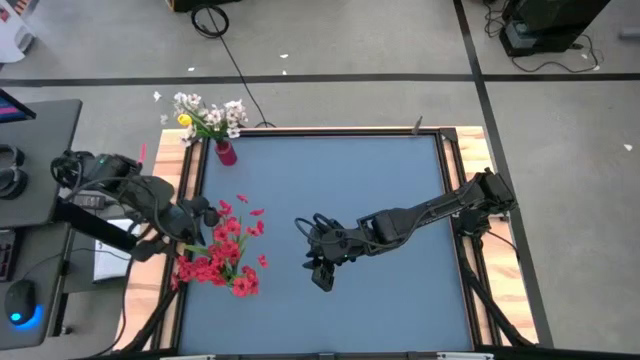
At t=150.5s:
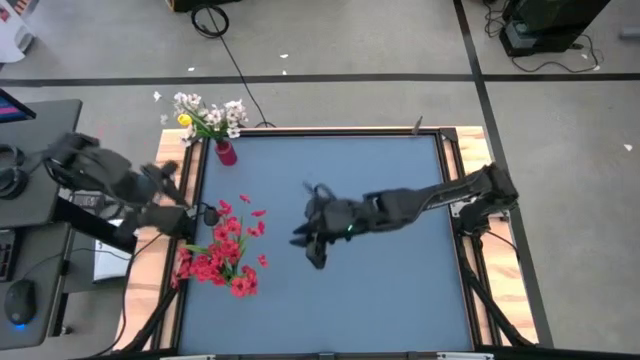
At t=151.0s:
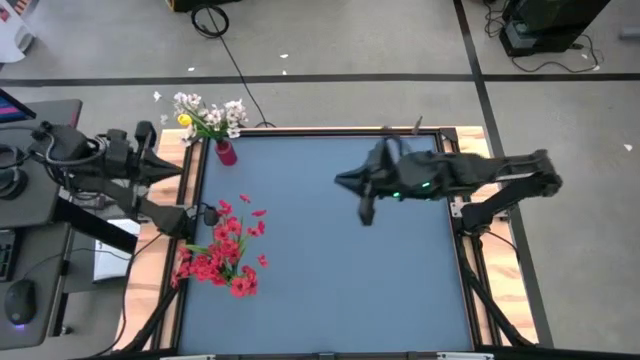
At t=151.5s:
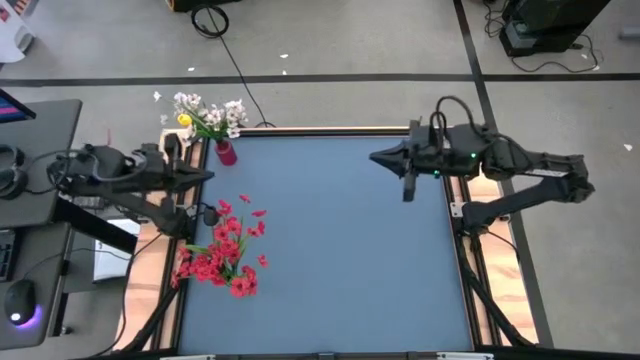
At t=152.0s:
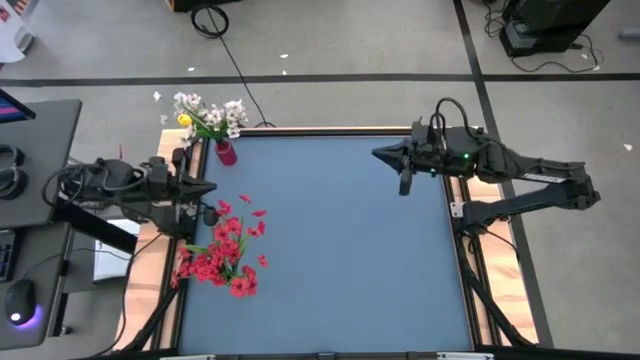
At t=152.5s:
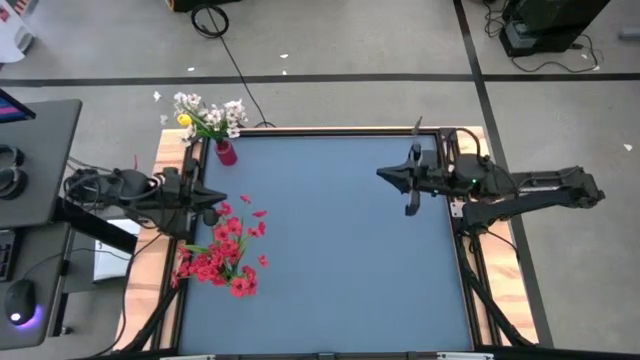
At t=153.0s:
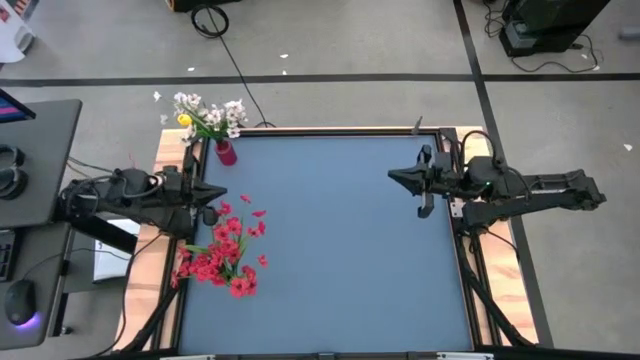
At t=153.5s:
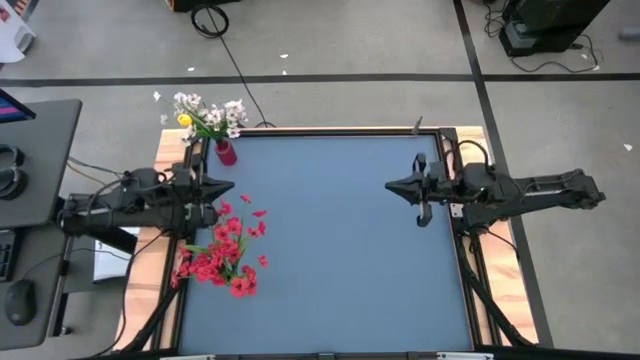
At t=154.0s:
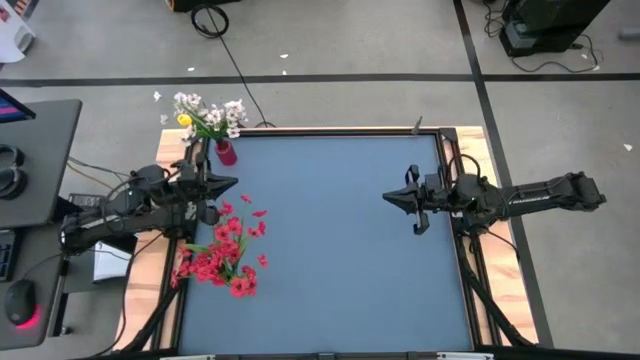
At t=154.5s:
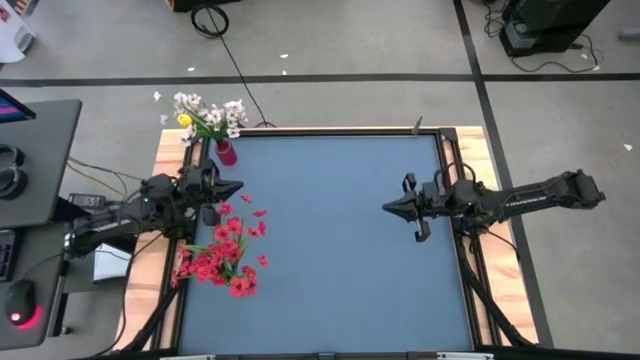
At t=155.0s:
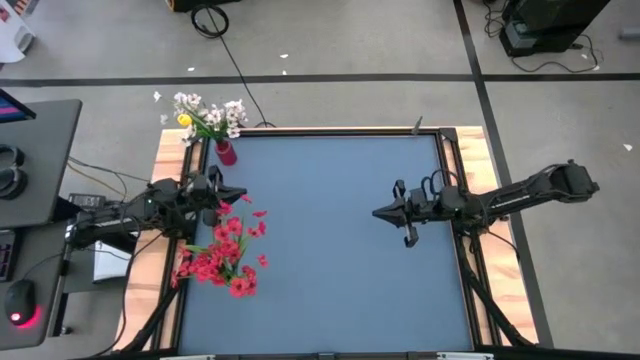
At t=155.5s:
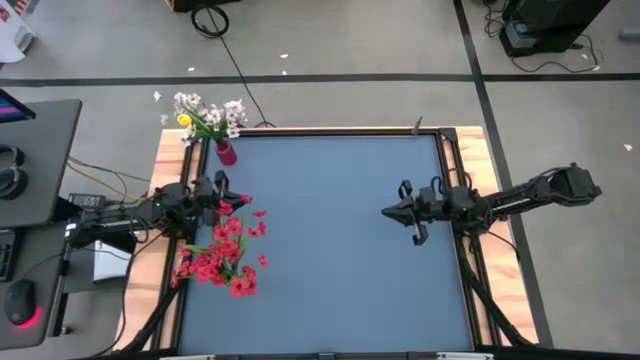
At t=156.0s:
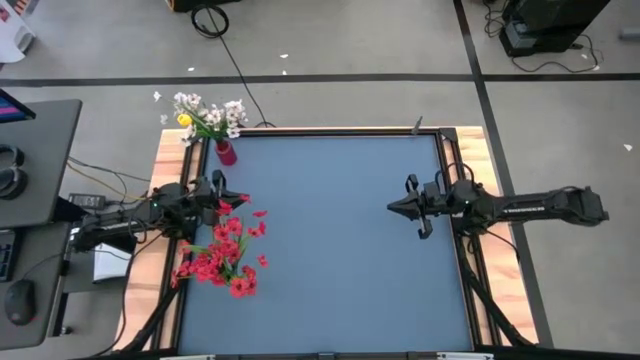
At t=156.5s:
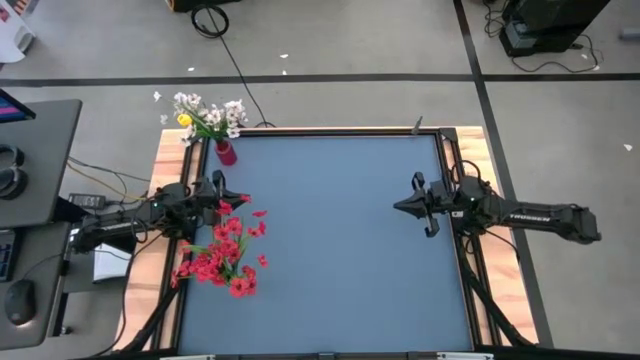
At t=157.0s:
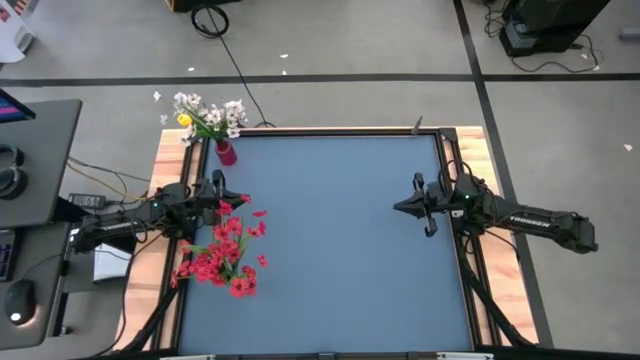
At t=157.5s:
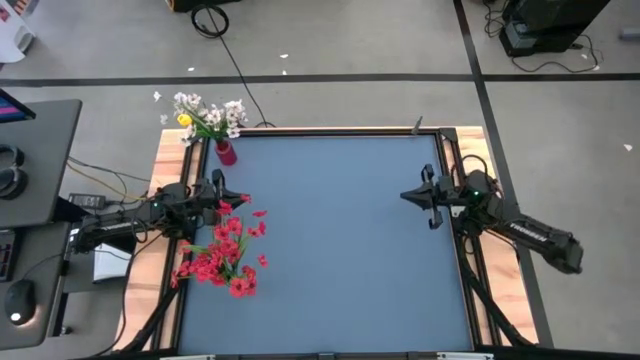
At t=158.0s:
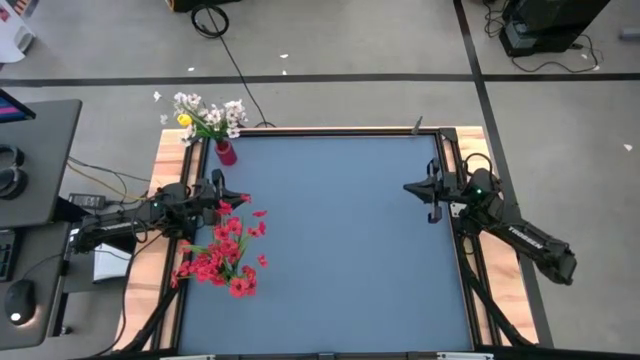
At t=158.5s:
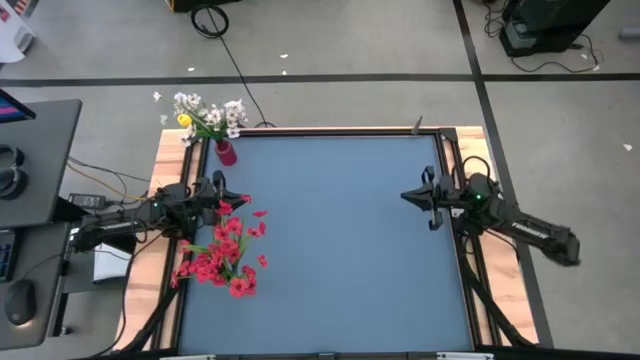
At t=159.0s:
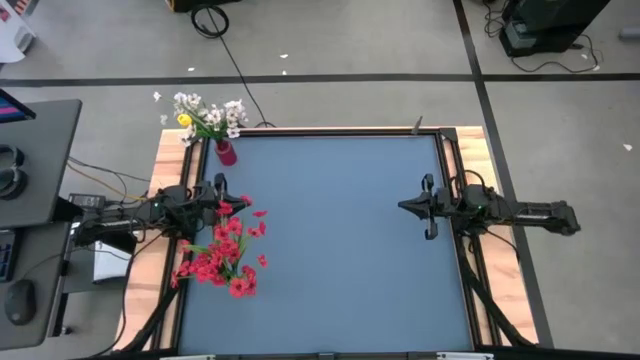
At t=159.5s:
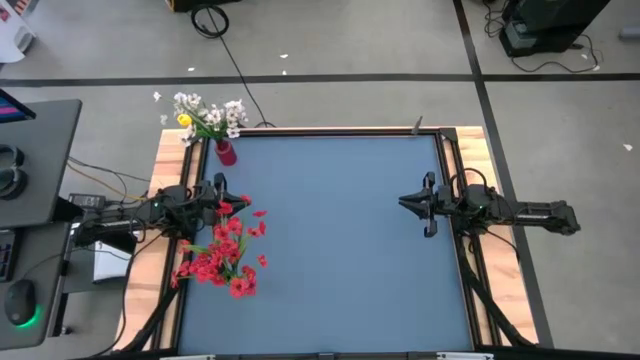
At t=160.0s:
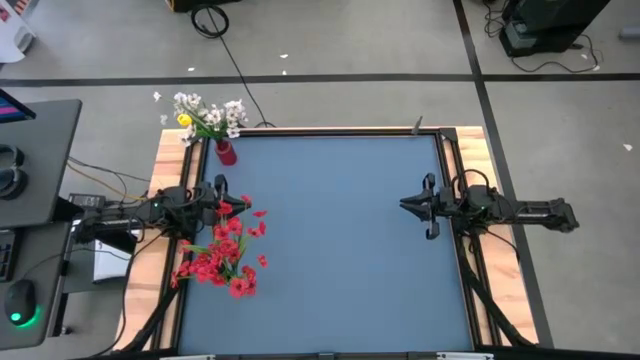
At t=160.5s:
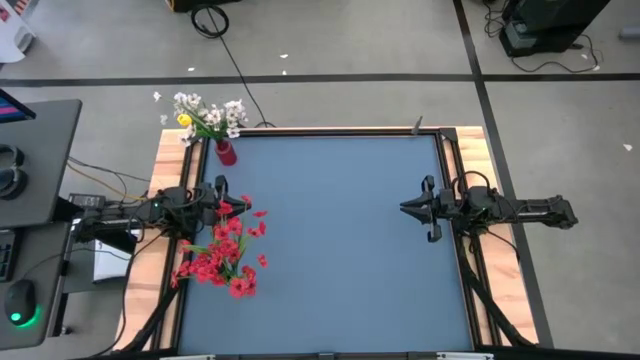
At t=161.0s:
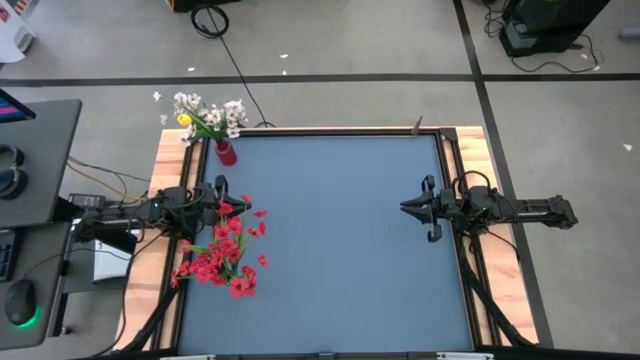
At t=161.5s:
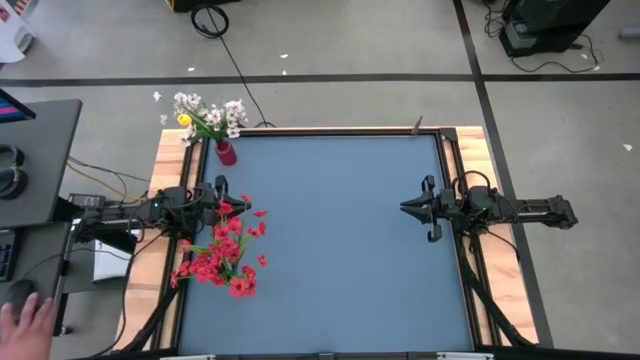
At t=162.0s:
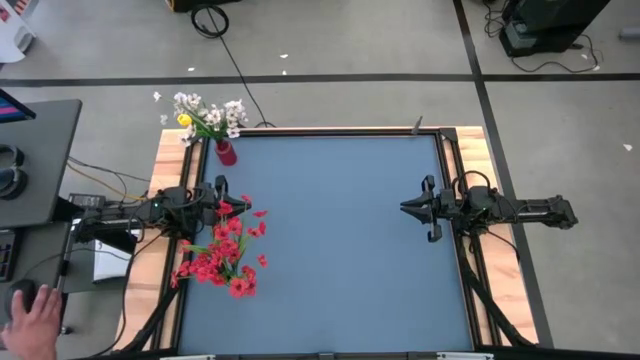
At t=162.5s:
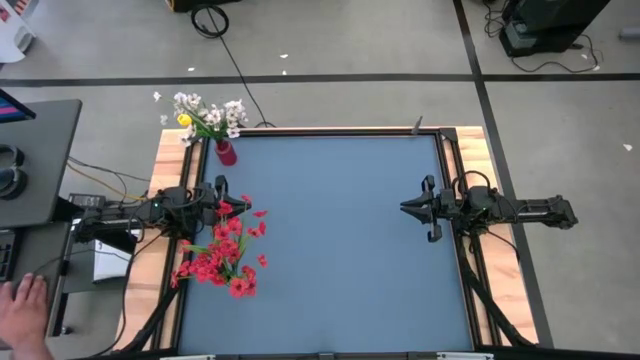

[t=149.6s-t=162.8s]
Task: Sort flowers into vase by color
Return to Home Position

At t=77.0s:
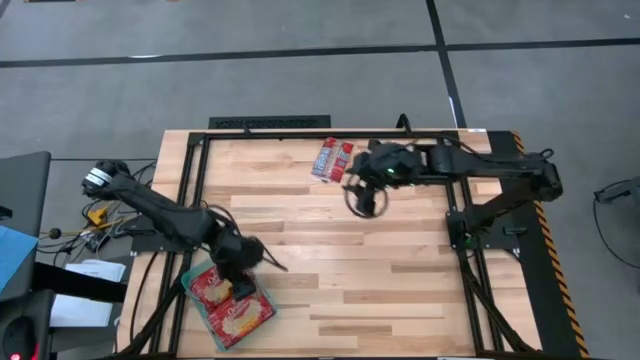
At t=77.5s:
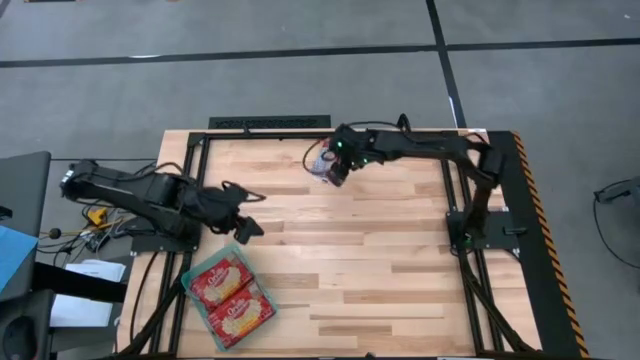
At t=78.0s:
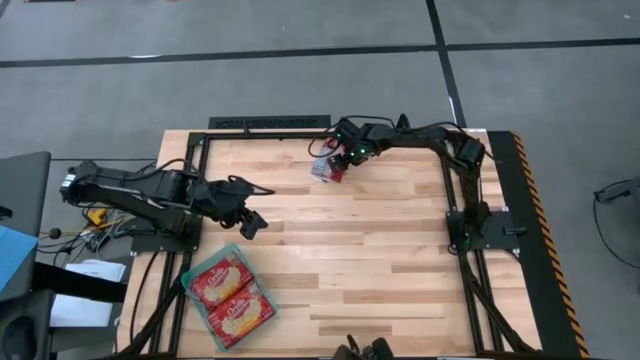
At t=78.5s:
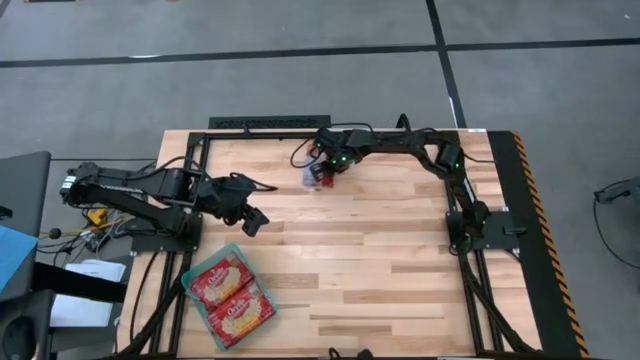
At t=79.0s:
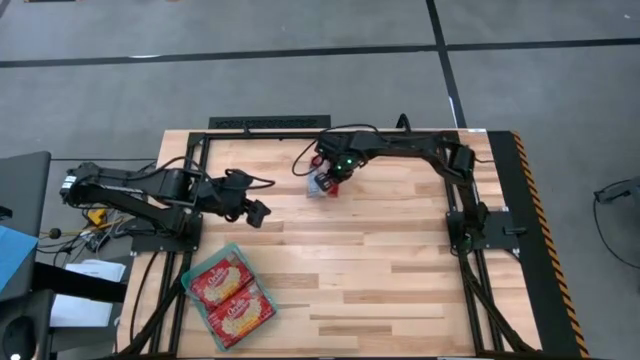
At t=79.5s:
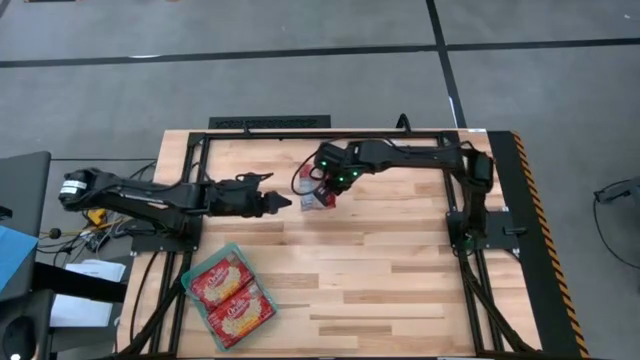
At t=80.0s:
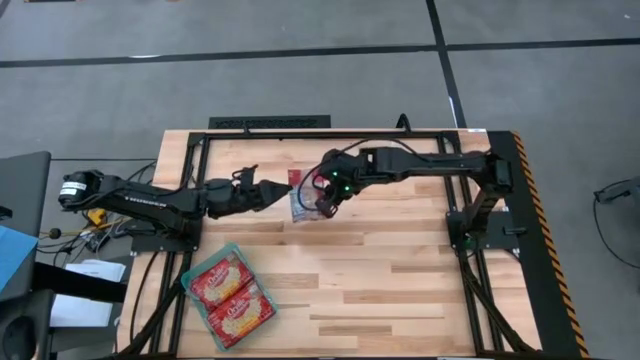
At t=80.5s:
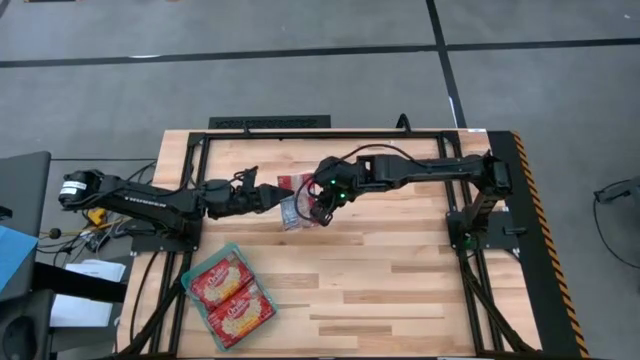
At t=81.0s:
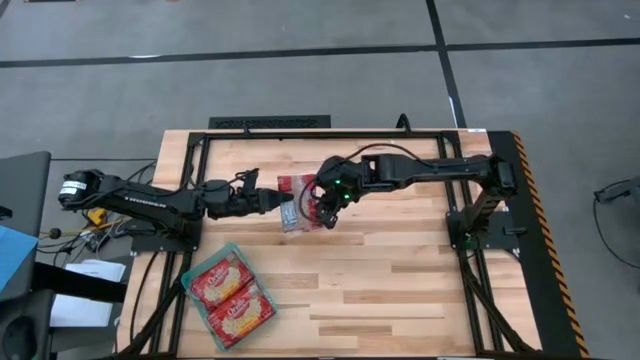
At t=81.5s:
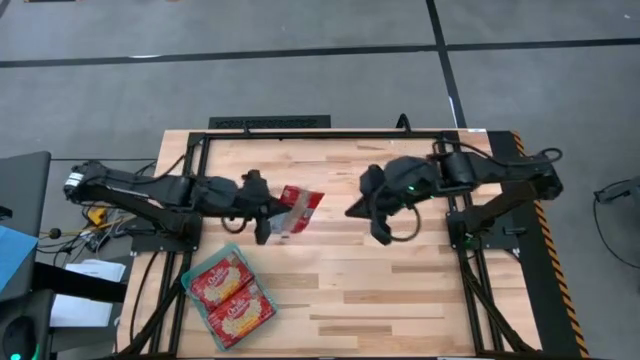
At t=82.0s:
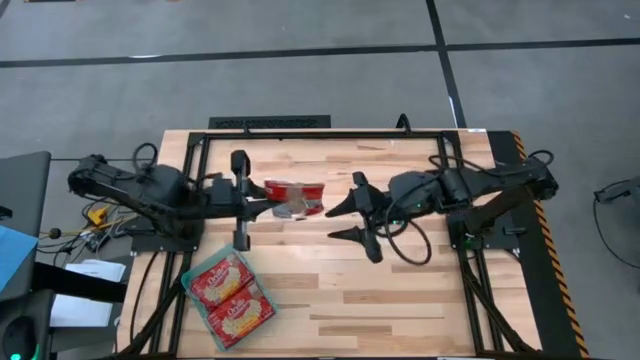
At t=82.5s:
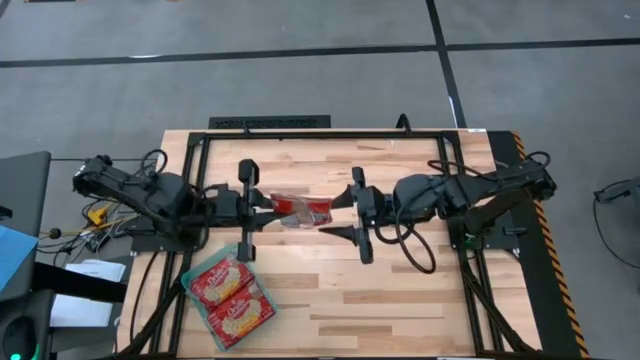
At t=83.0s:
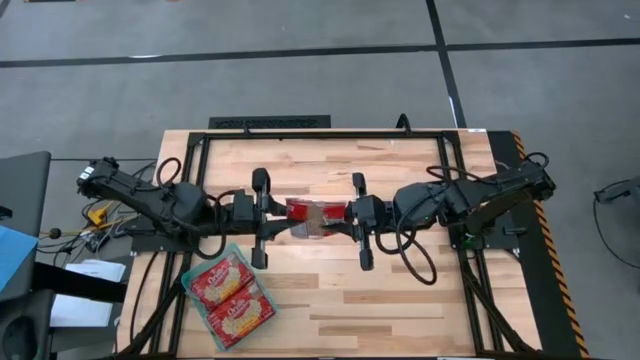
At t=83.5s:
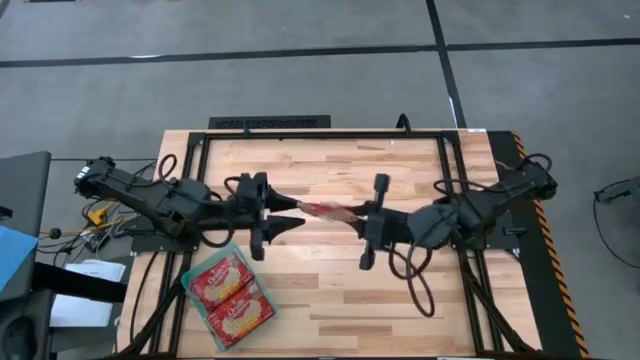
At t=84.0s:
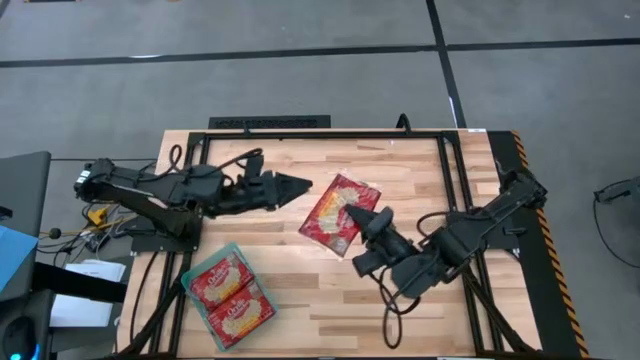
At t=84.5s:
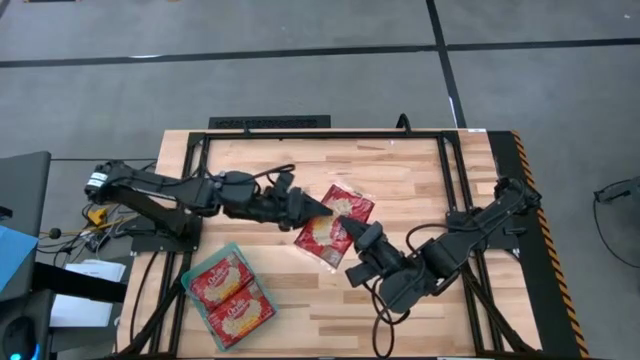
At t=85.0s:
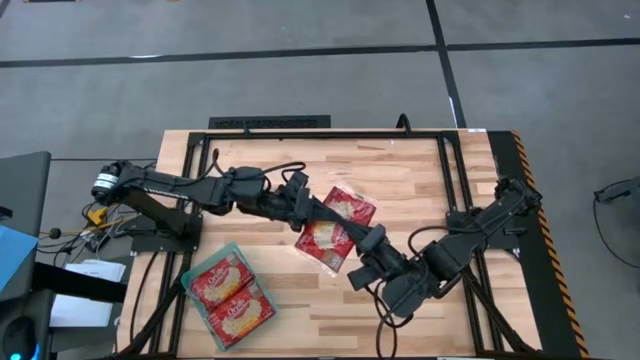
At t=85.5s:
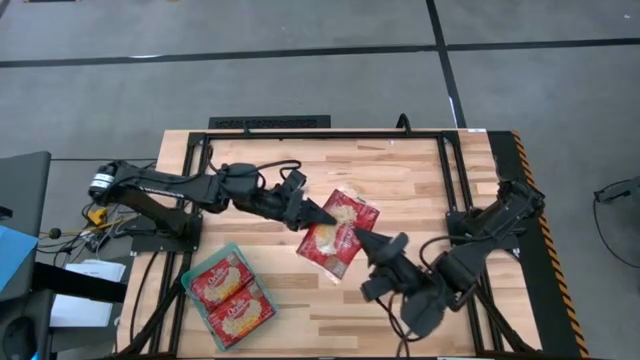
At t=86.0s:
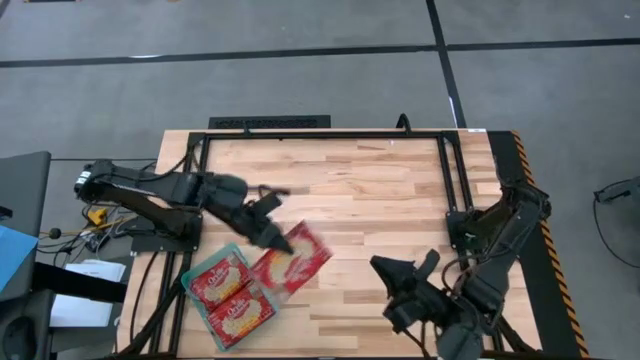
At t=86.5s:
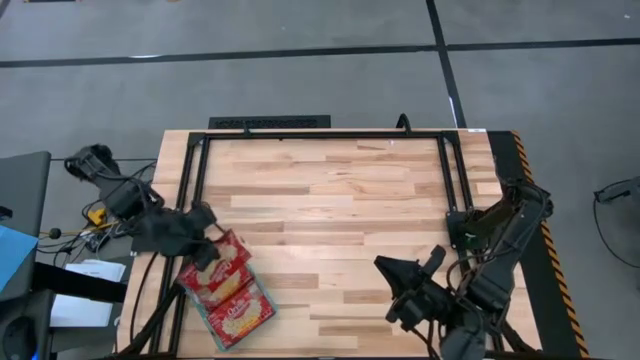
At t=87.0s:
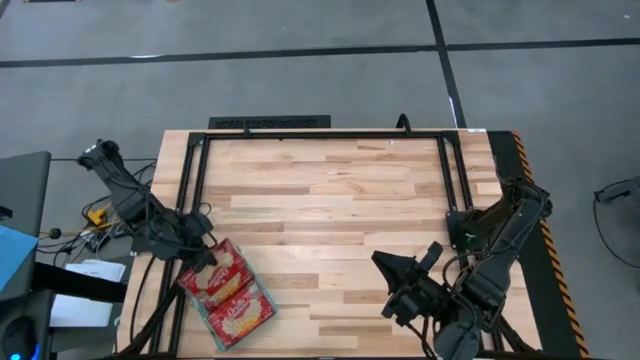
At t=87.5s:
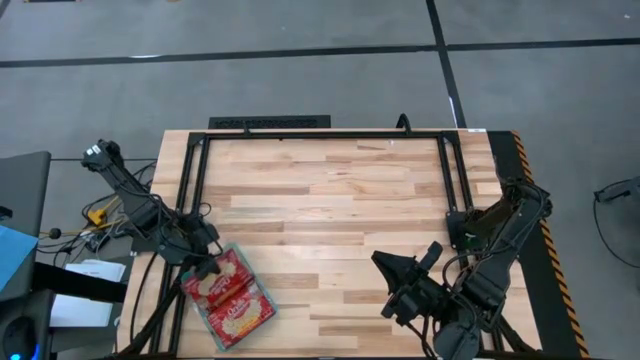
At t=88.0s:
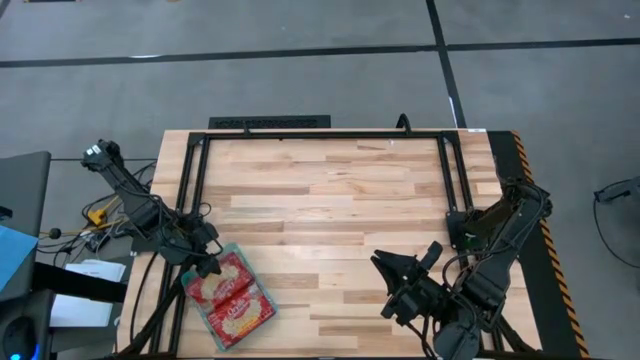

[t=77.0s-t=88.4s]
Task: Sort popcorn bags into baskets
Put the red popcorn bag into the green bin
